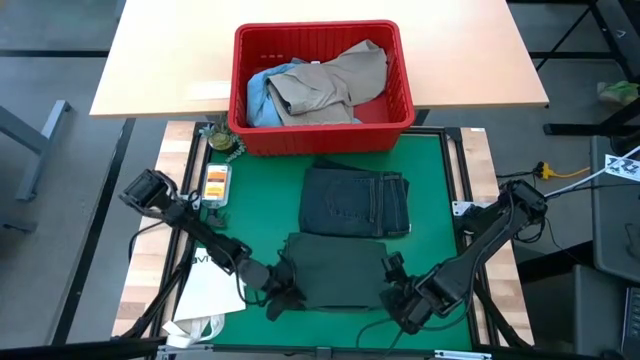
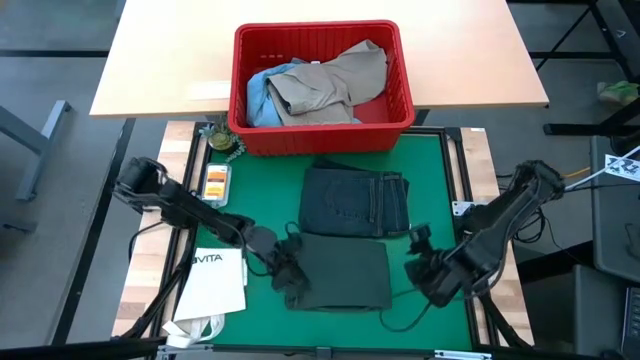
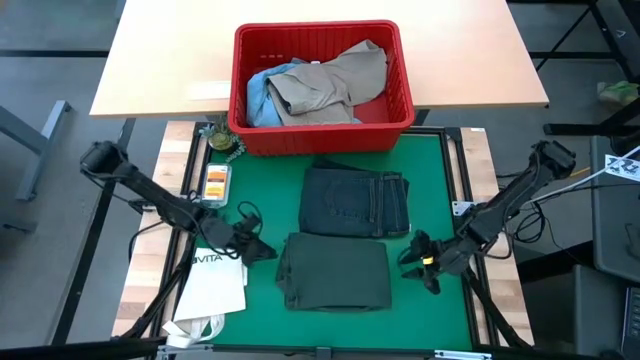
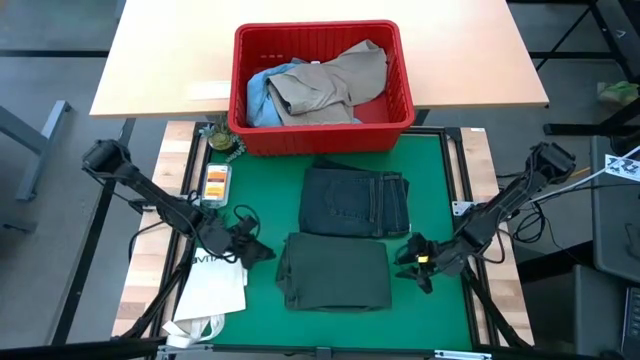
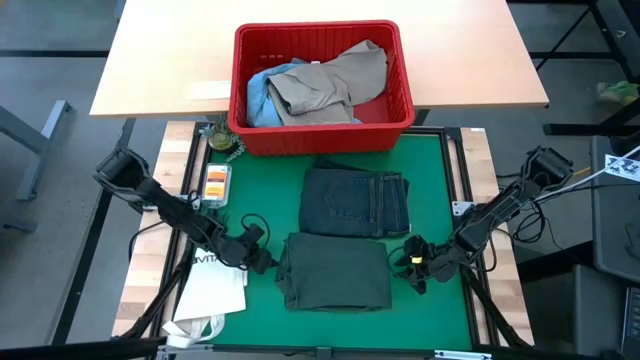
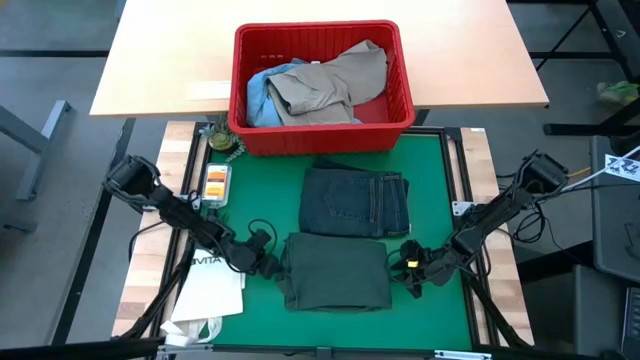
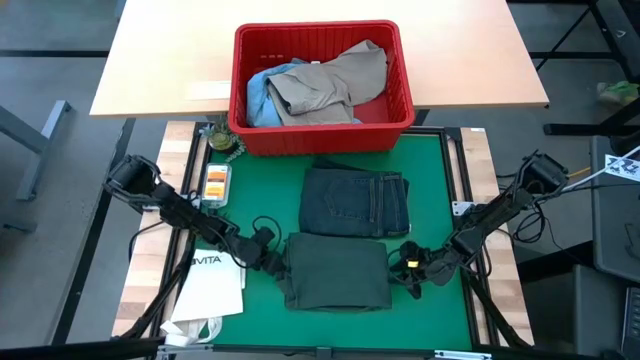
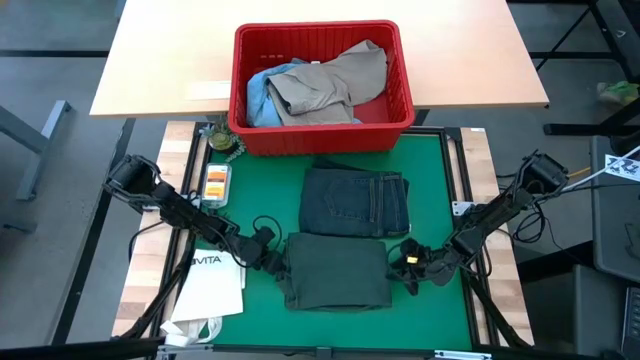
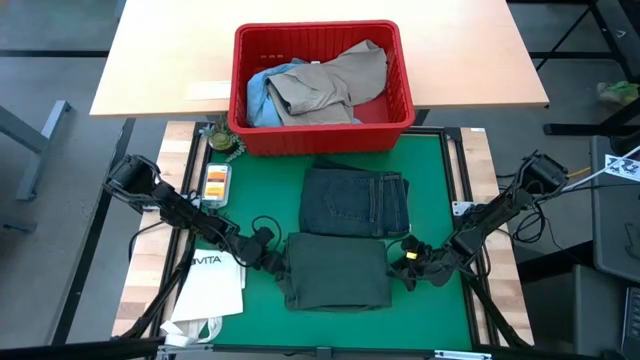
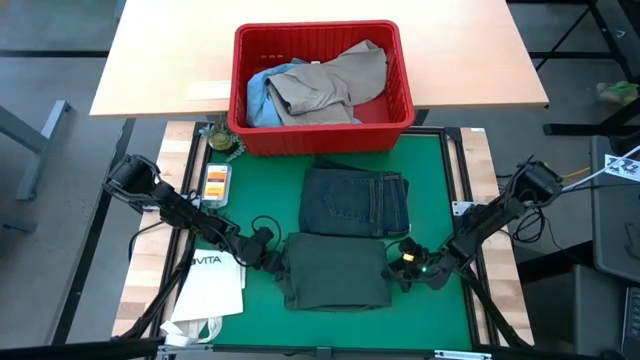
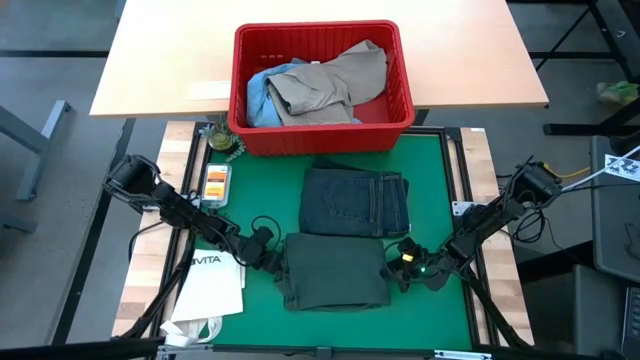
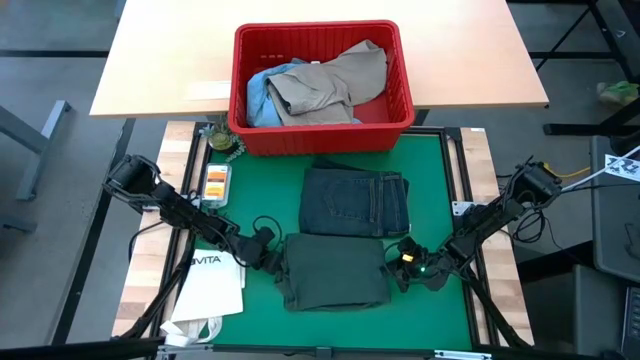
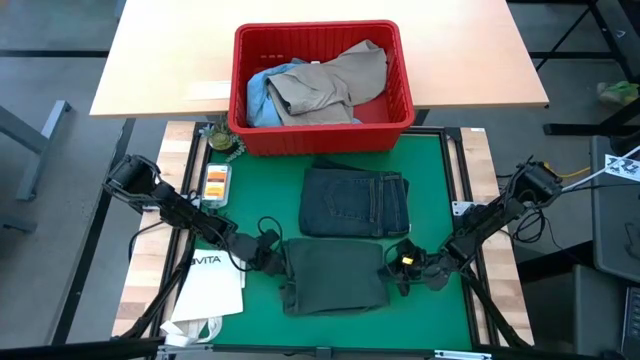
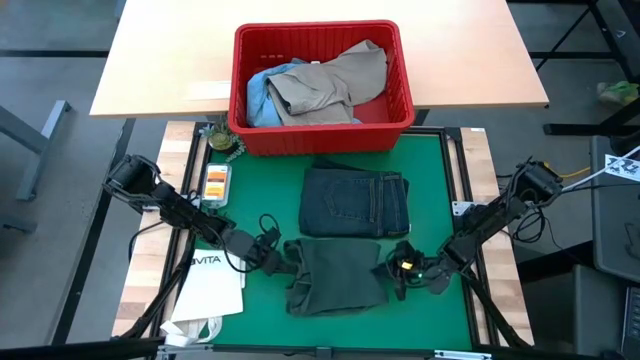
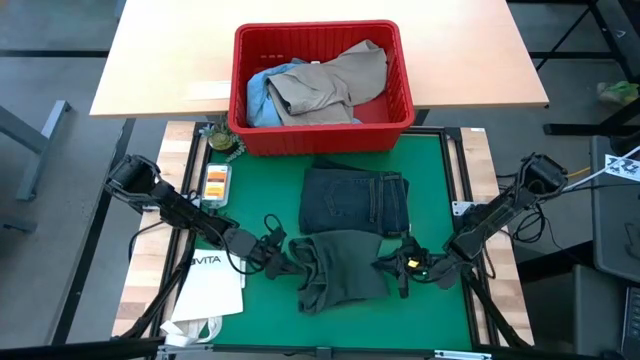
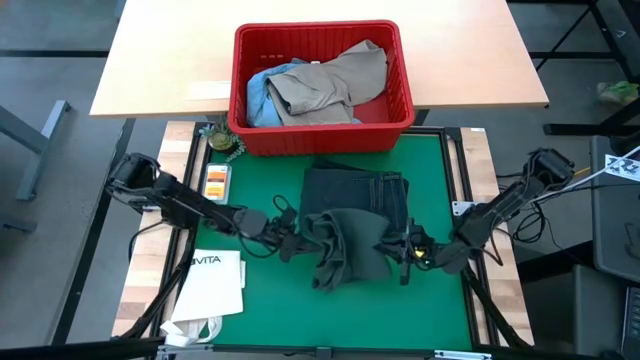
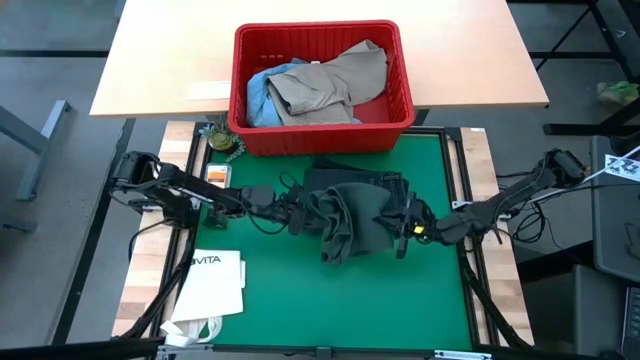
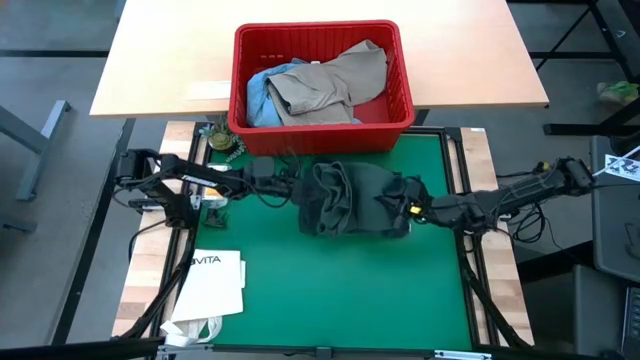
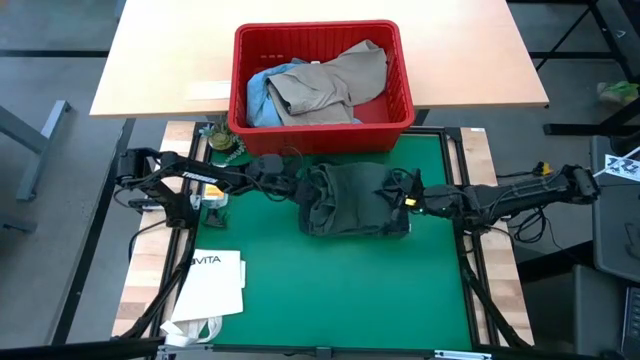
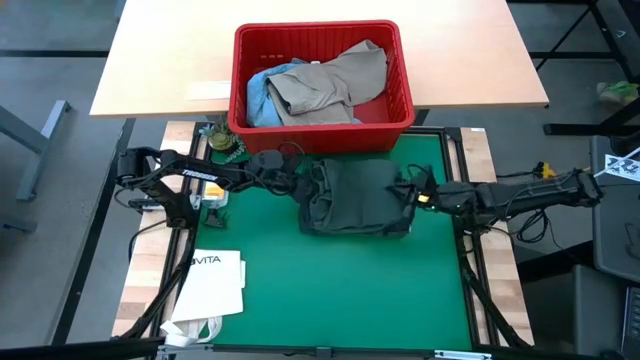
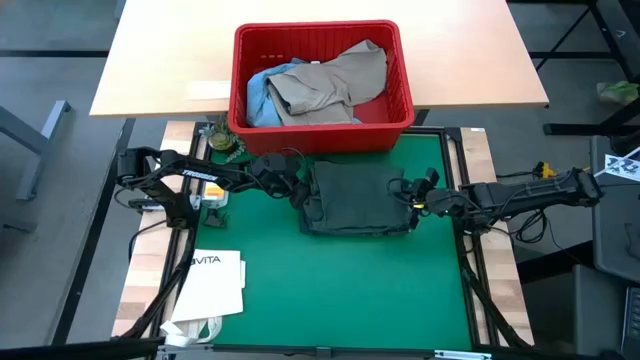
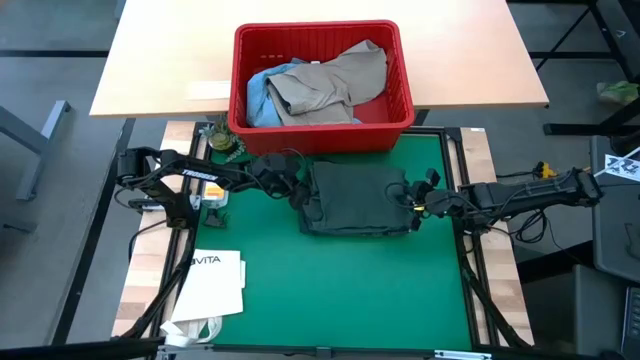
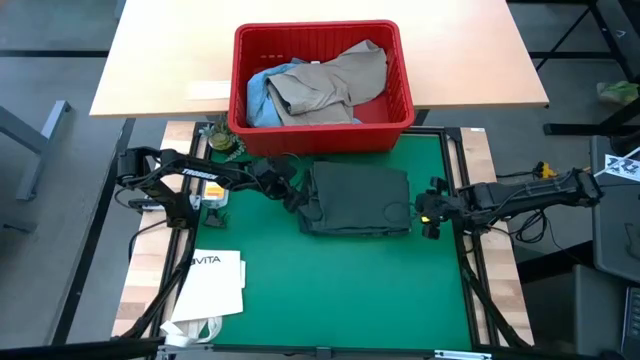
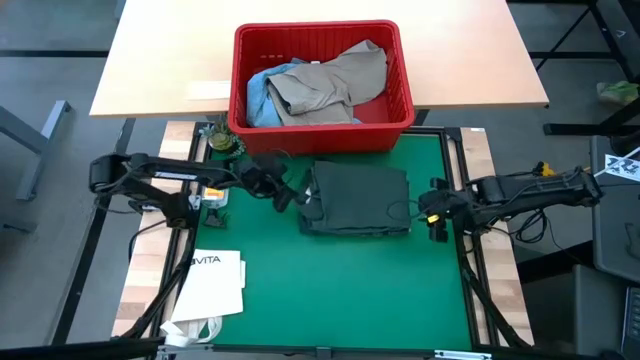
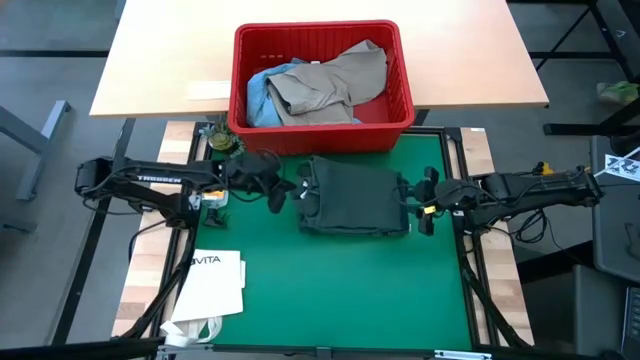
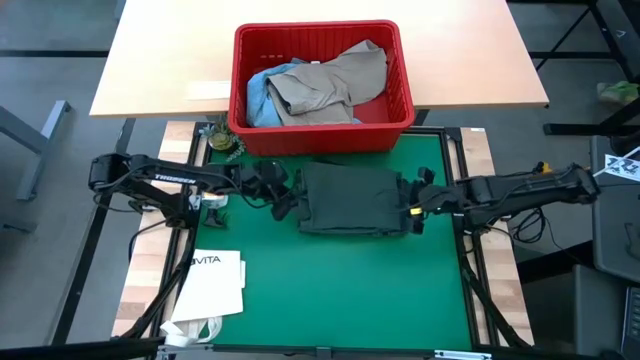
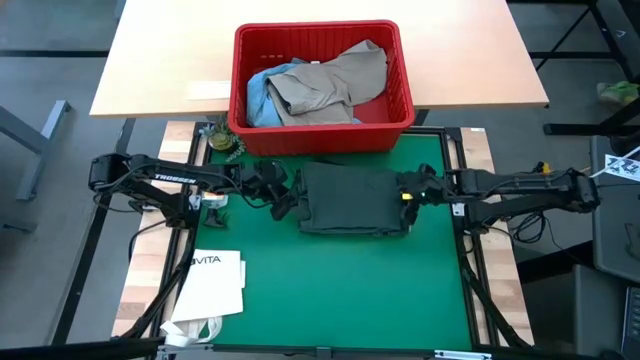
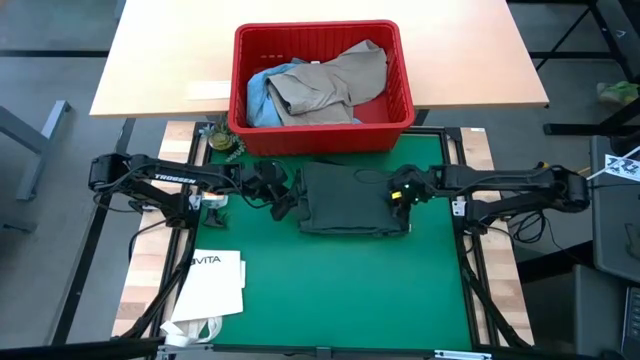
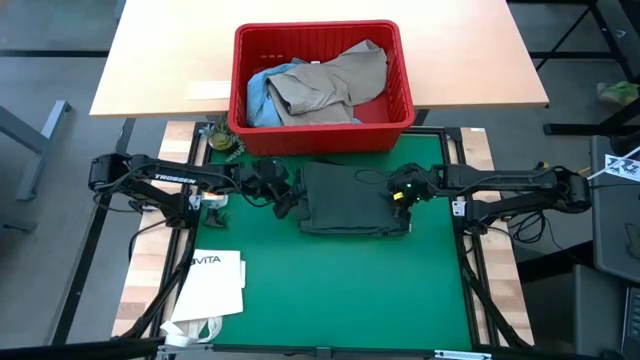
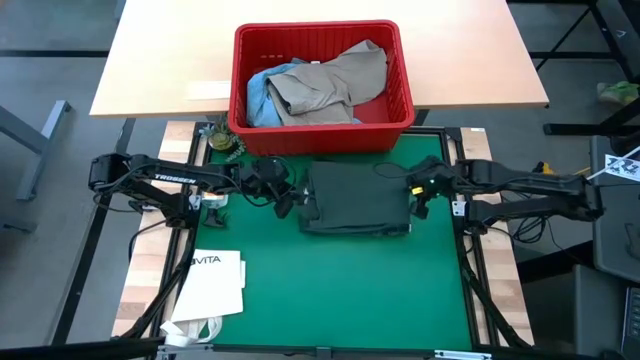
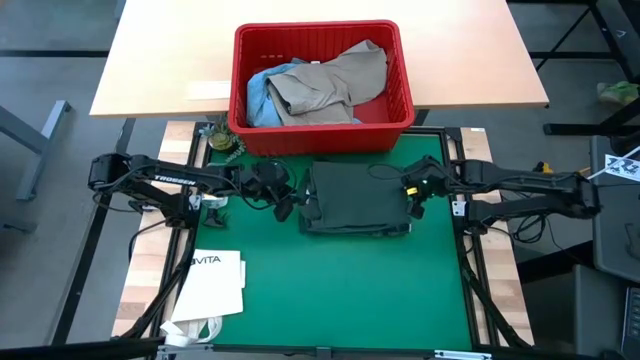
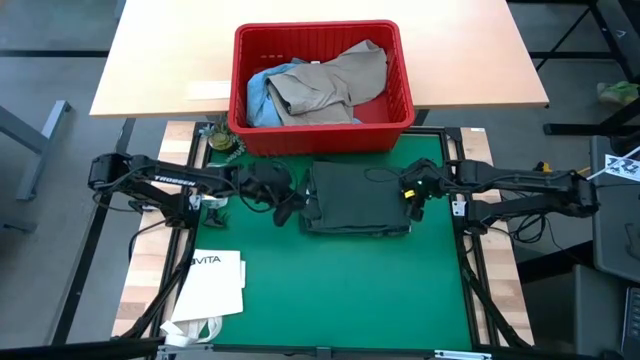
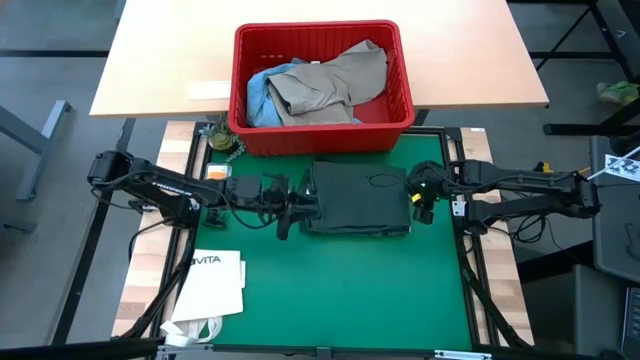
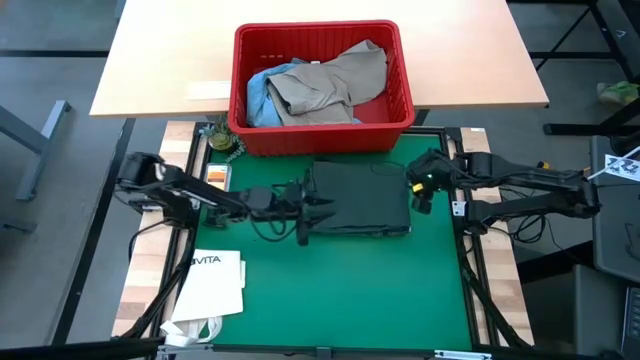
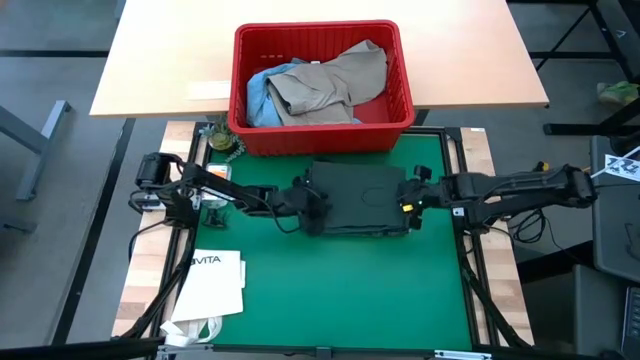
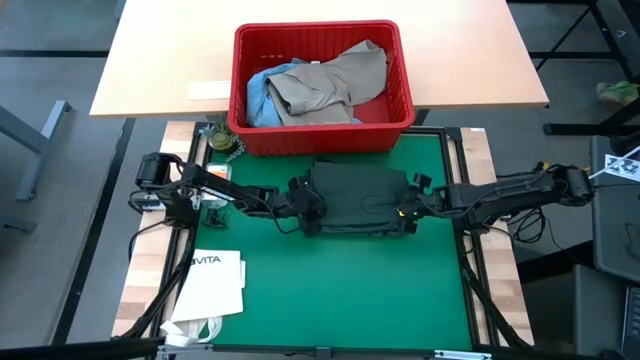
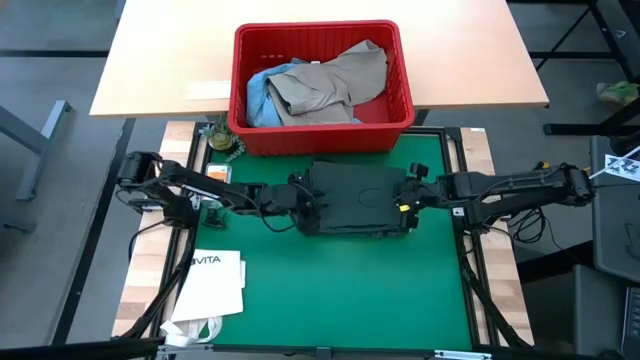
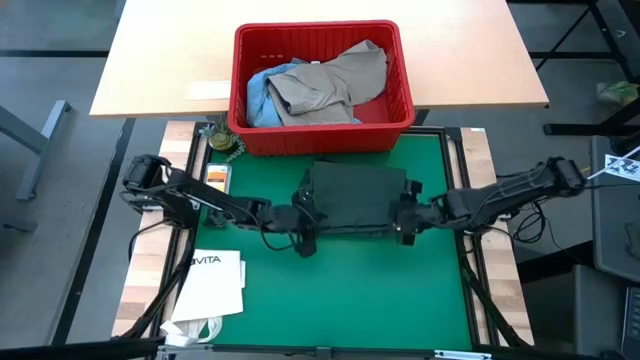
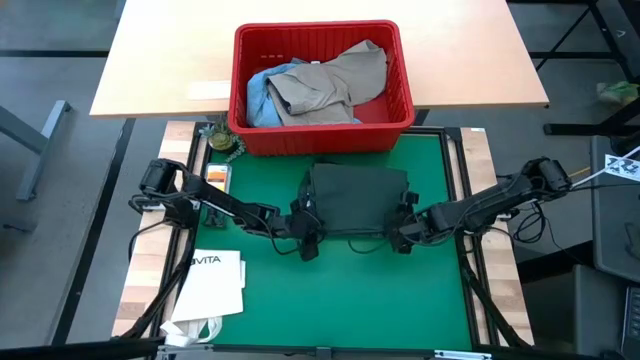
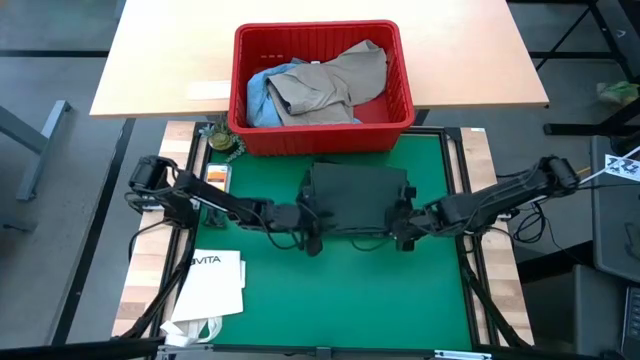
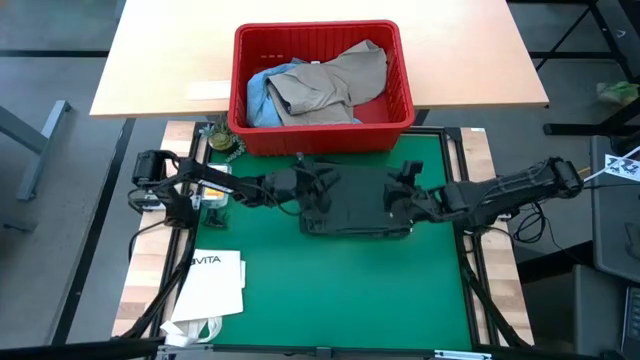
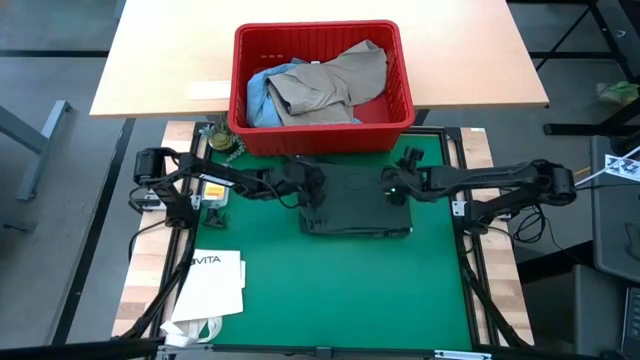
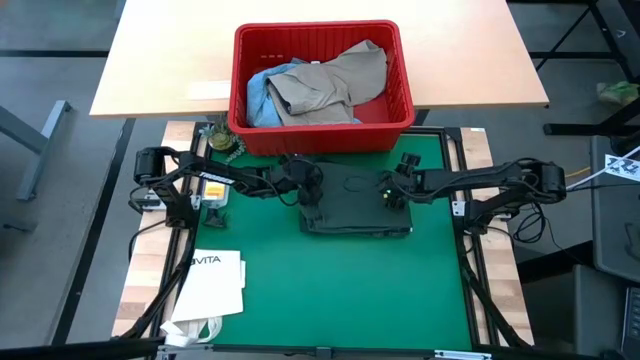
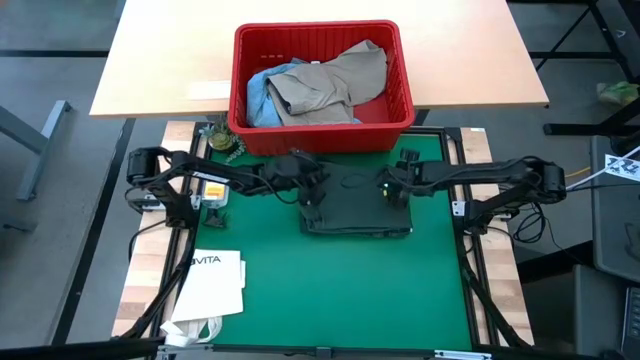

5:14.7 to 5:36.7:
Task: Fold Laundry from Bin
Stack the green shirt on top of the dark blue pants
